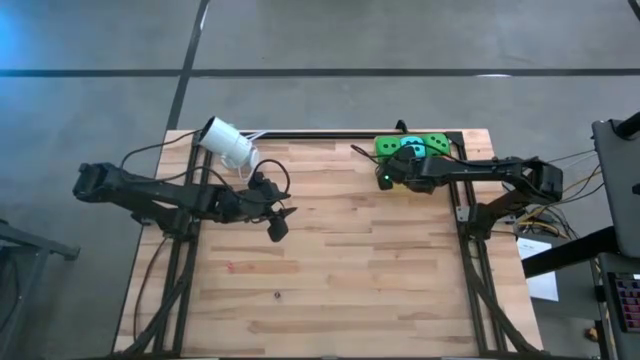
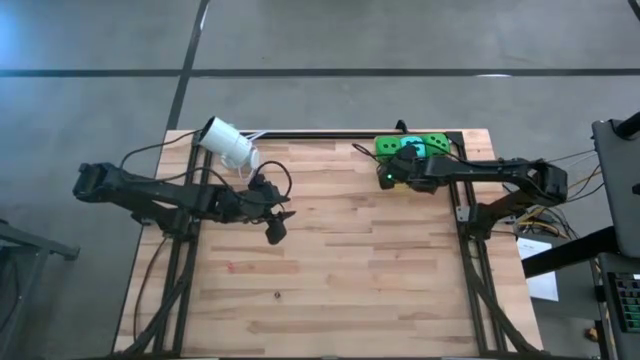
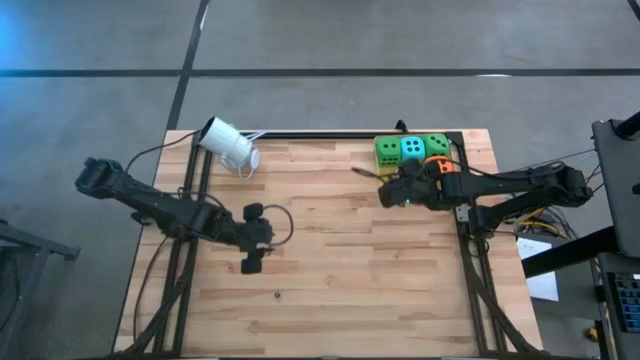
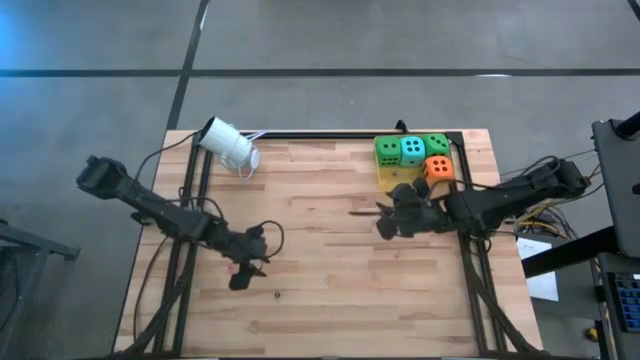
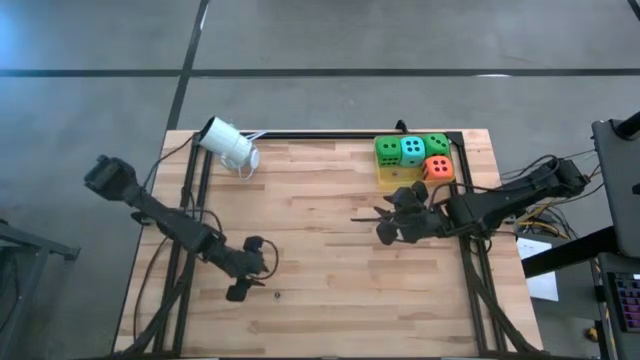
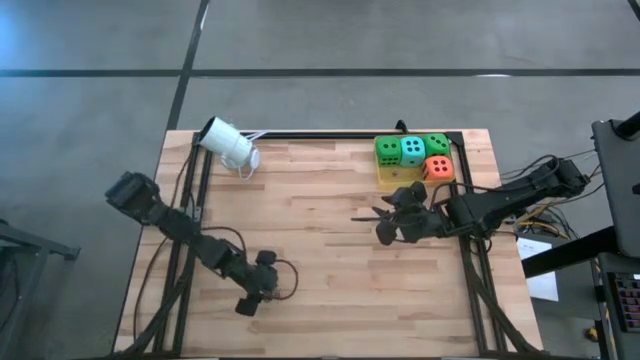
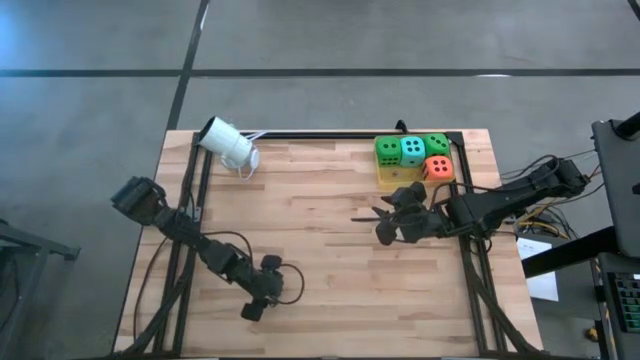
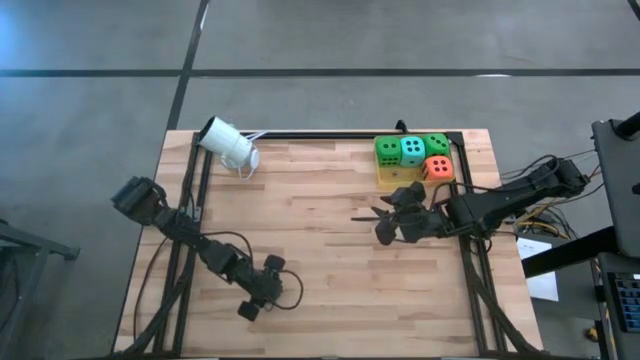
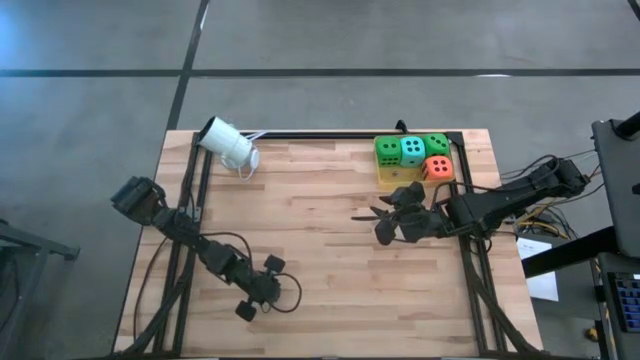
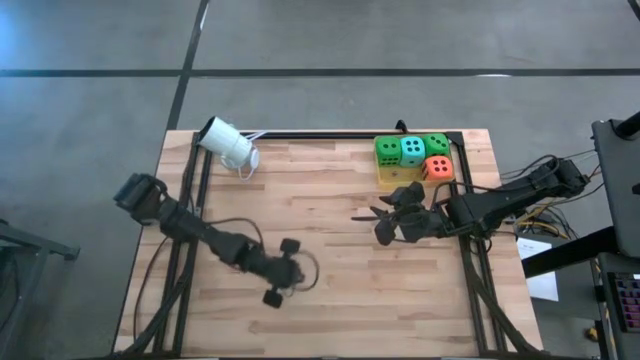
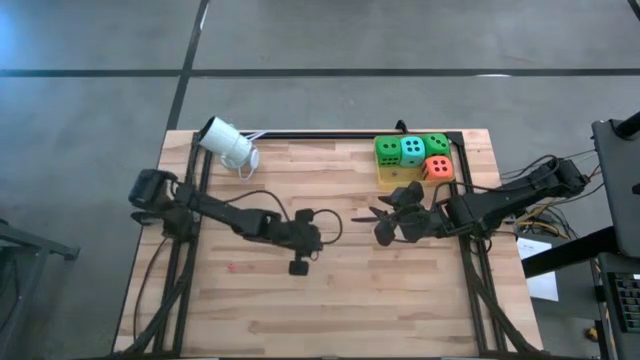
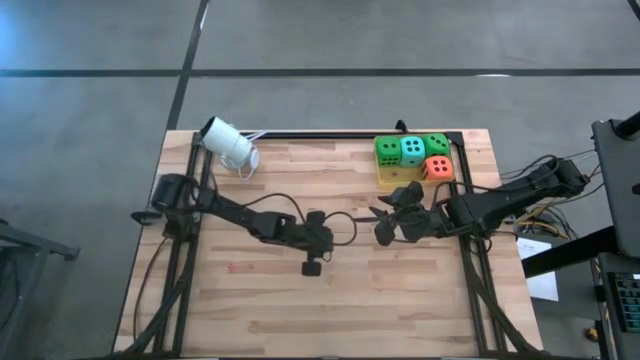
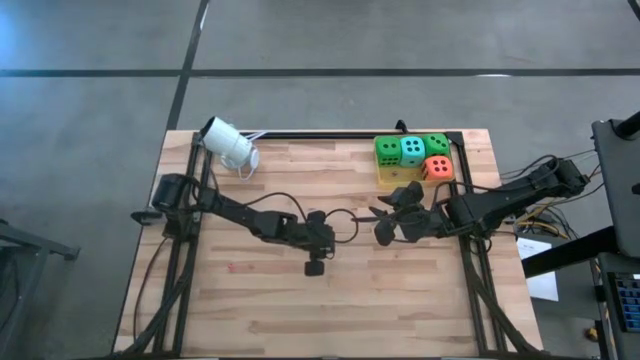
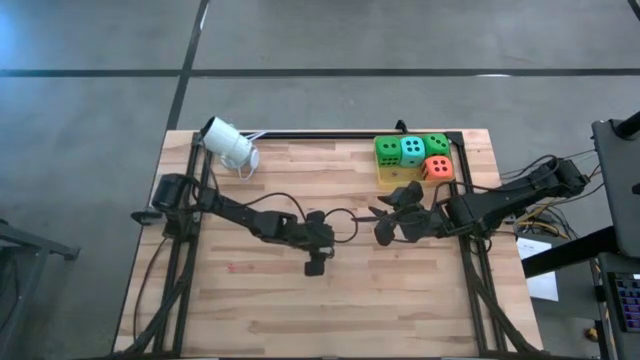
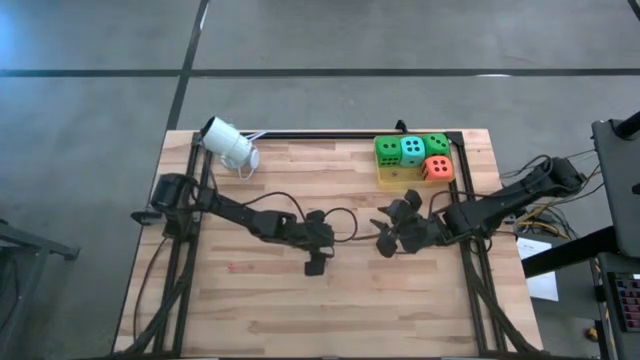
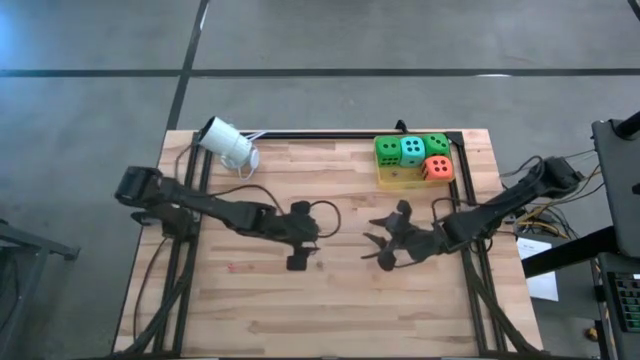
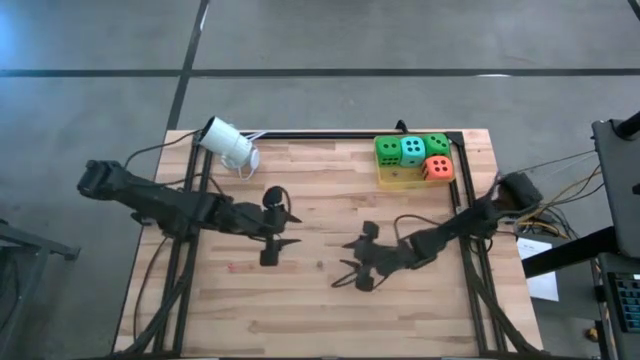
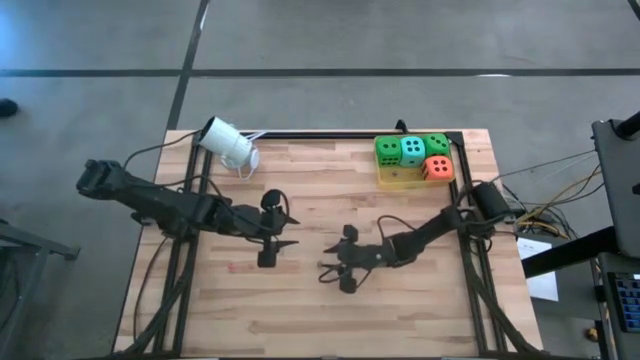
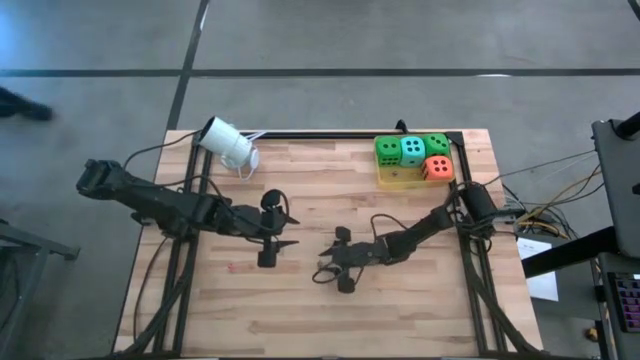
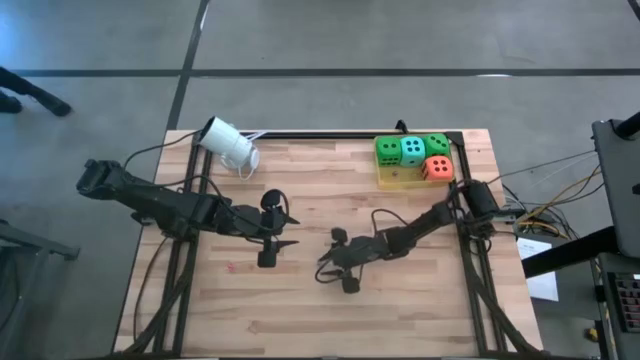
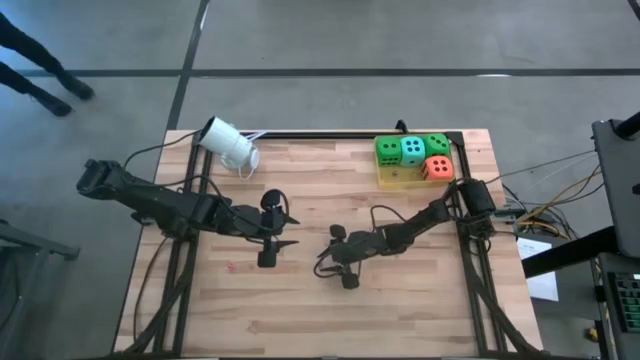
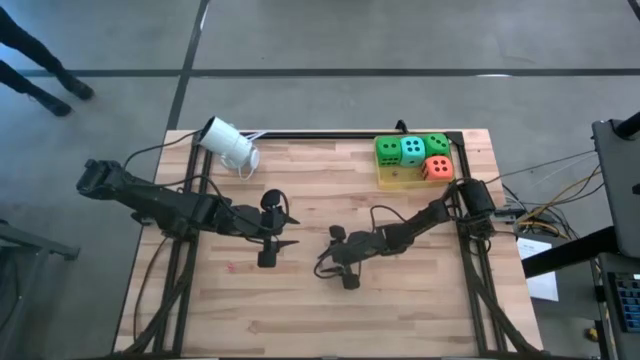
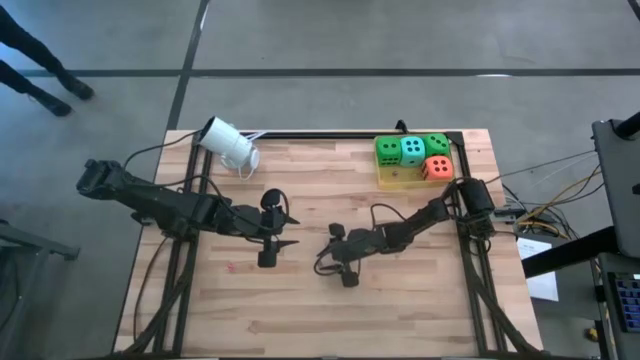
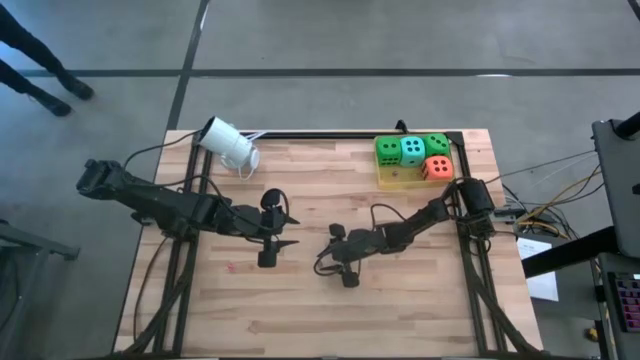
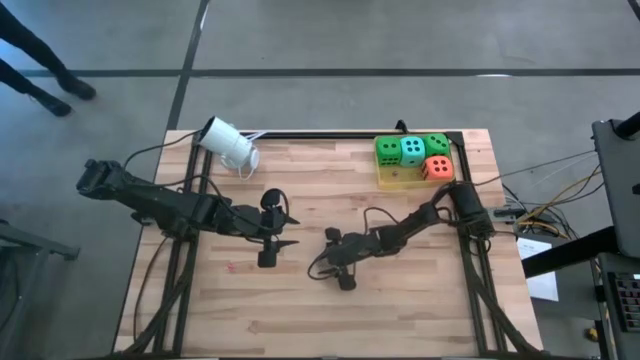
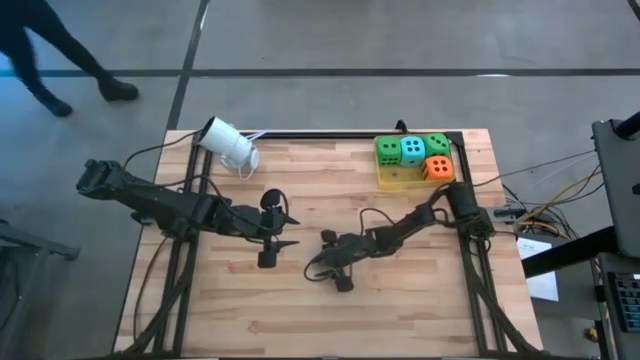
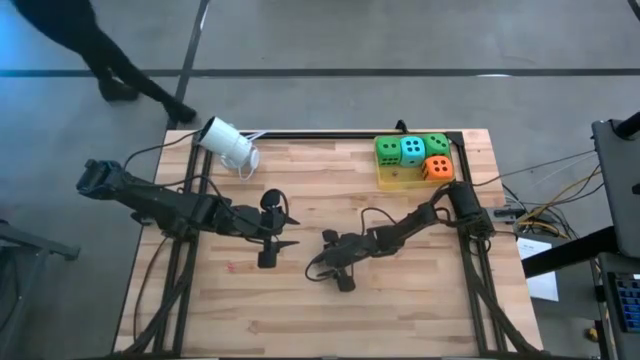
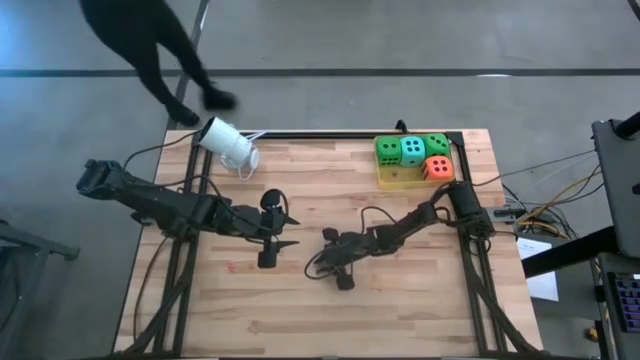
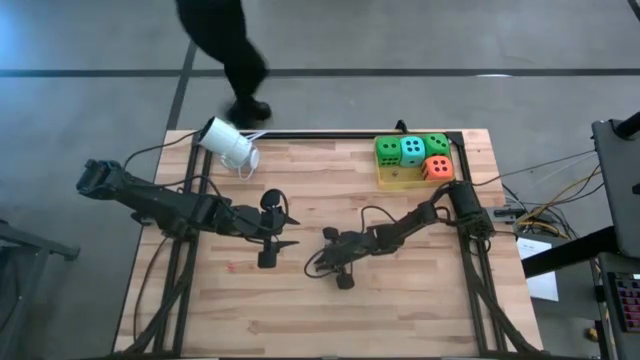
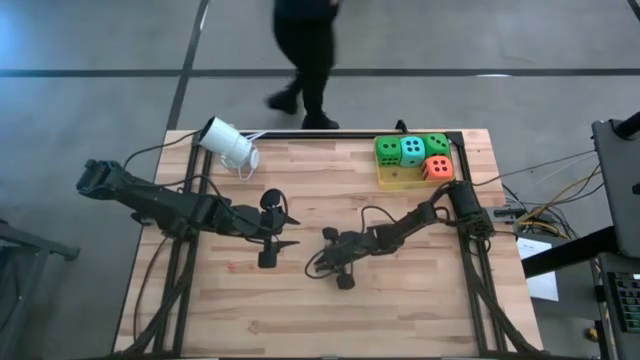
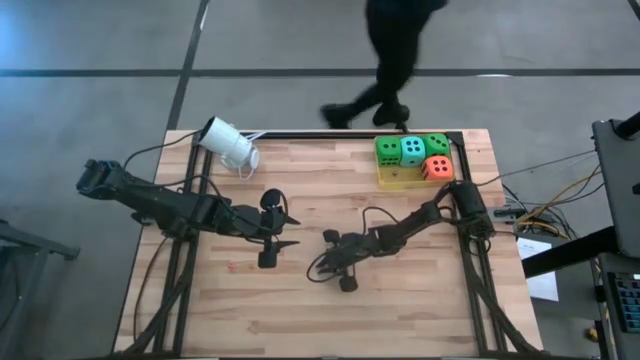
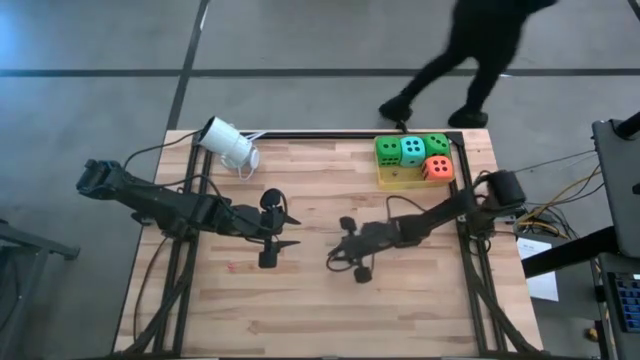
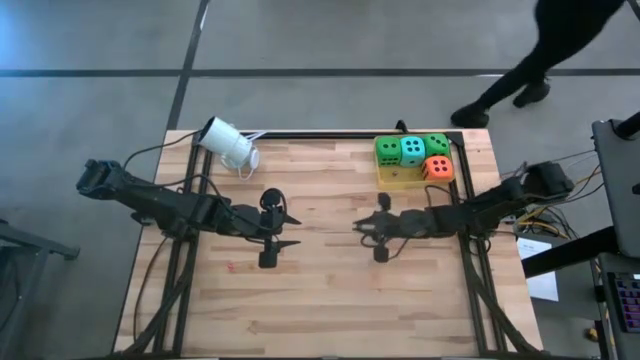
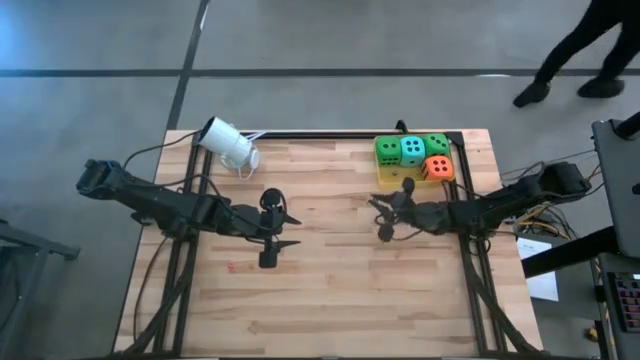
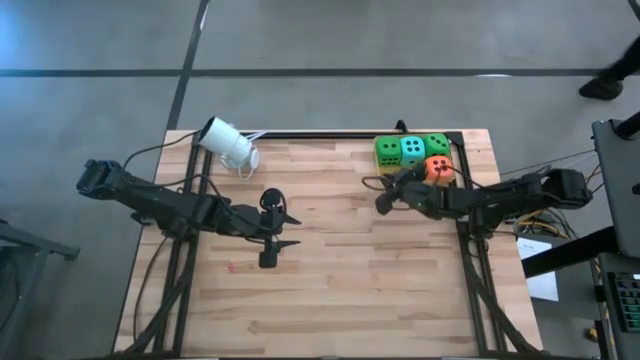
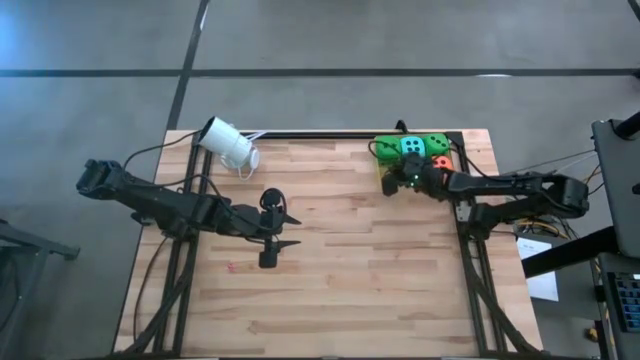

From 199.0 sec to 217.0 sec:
Task: Pick & Place Dice
Put the small black dice into the yellow bin

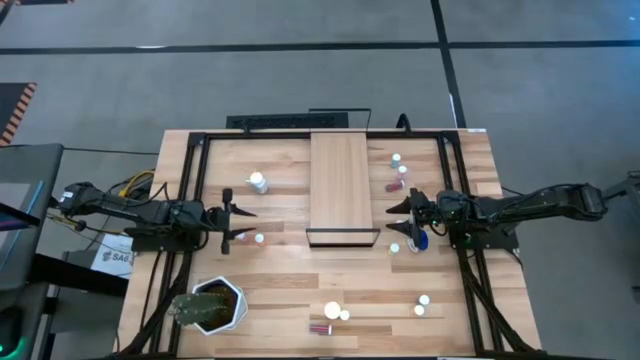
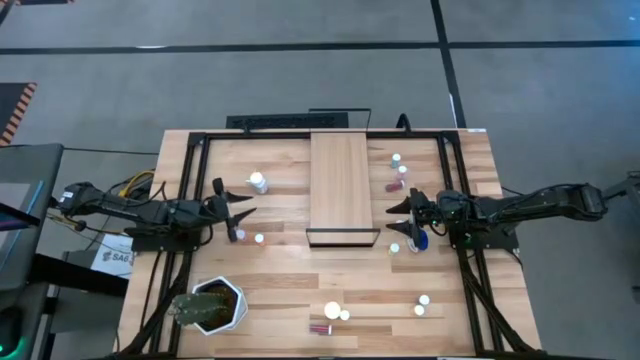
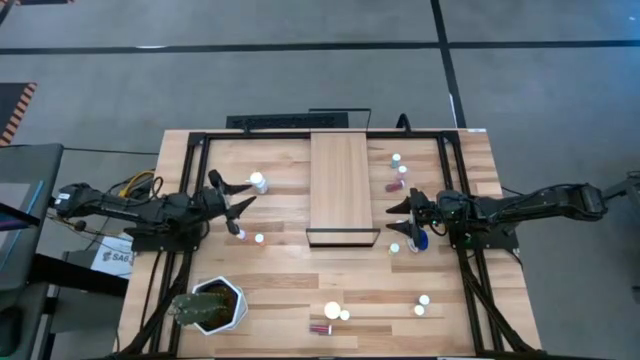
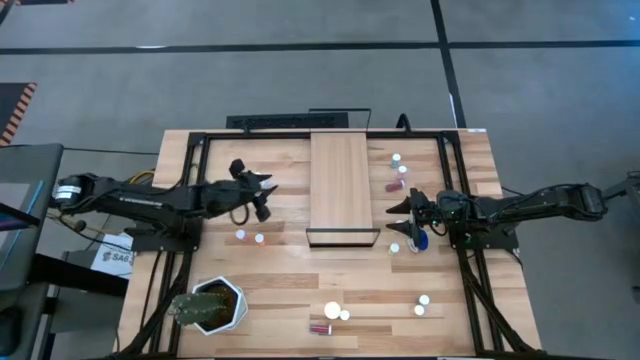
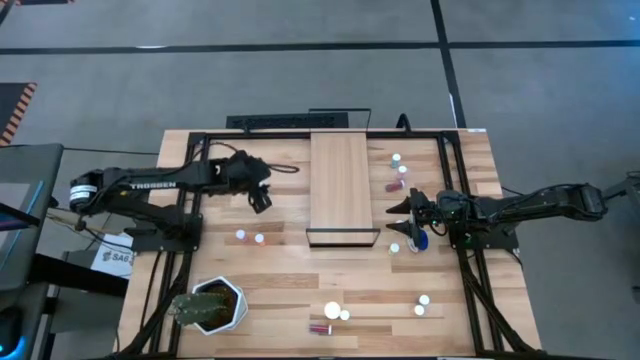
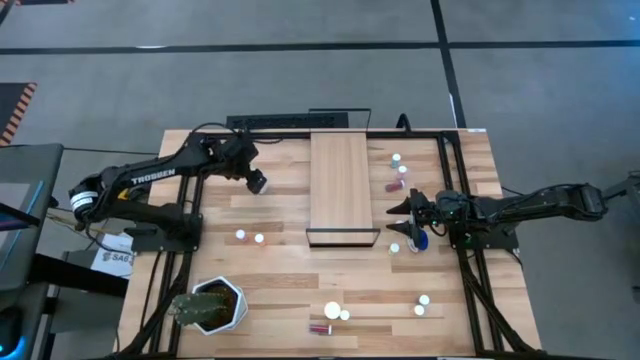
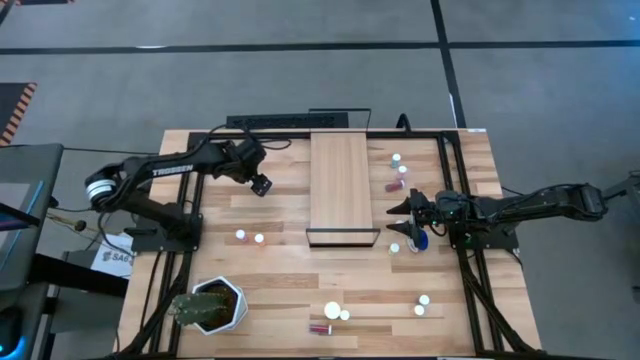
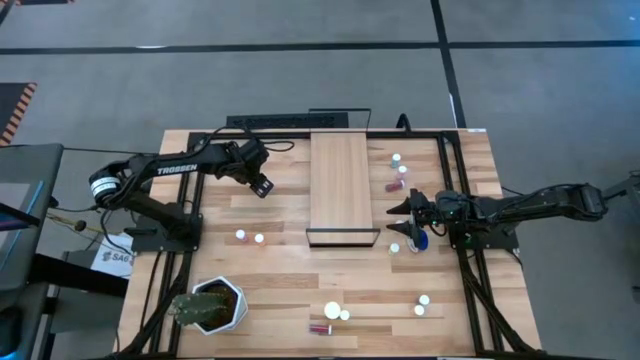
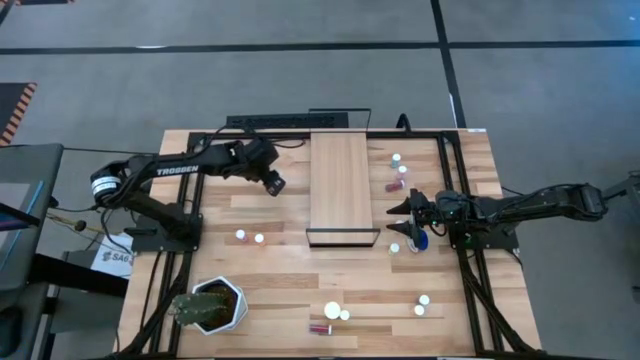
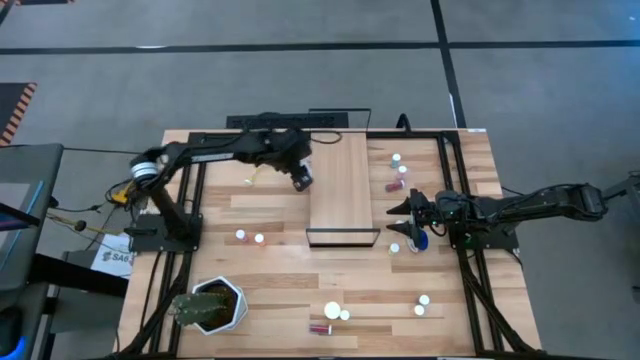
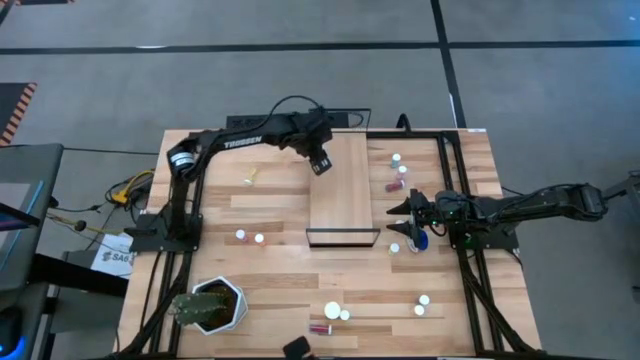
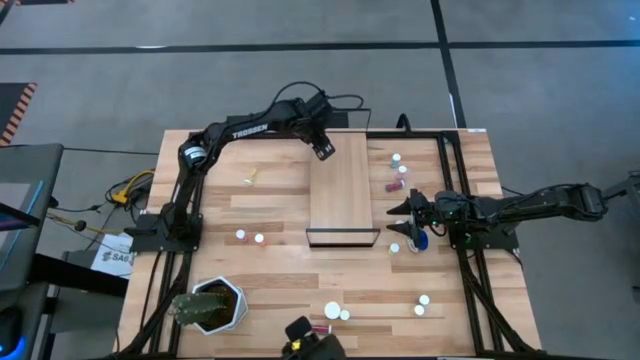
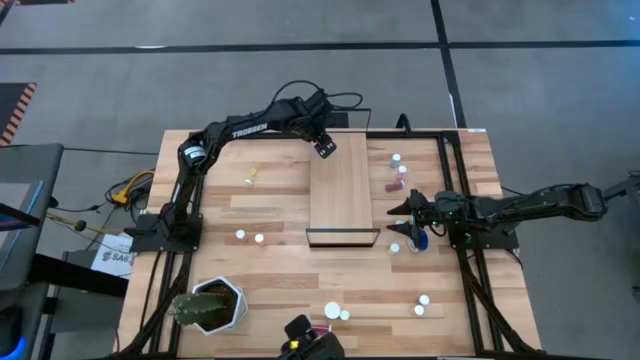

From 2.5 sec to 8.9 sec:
Task: Pick and place medicine bottles onto shelf by color
Put the white pill bottle on the shelf
